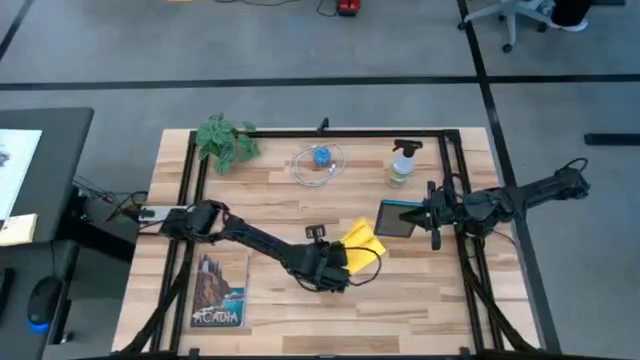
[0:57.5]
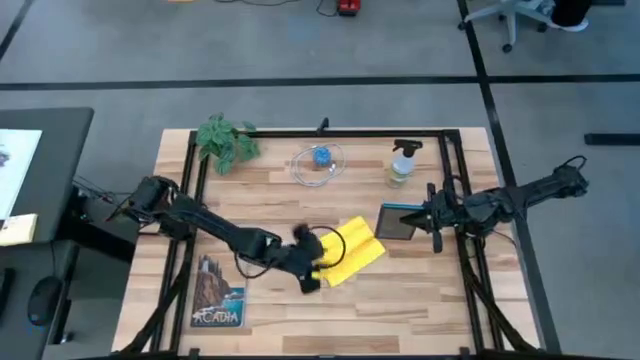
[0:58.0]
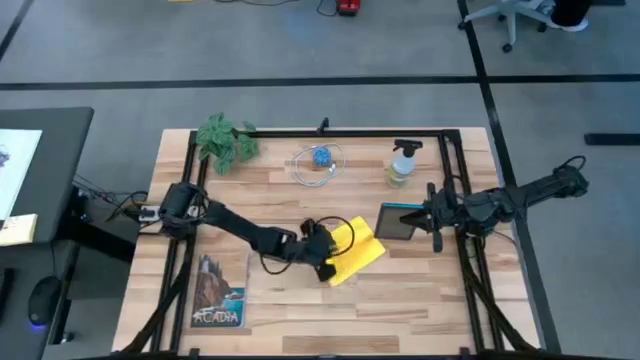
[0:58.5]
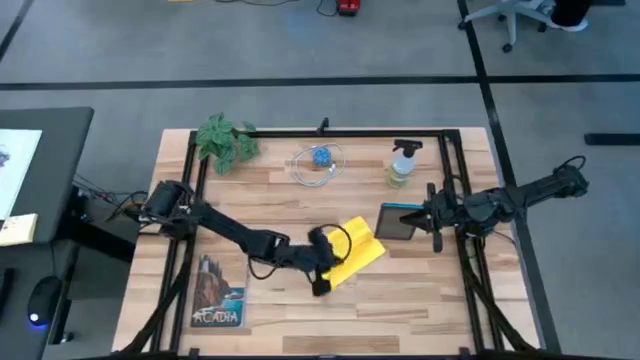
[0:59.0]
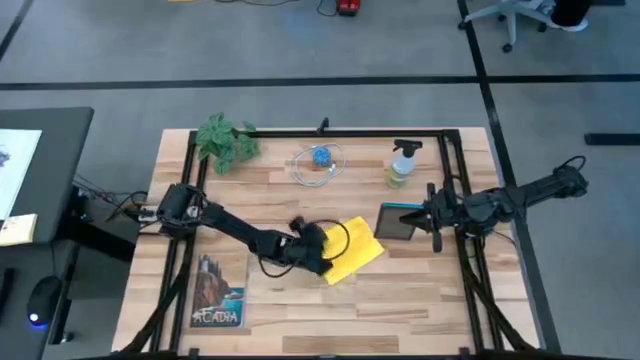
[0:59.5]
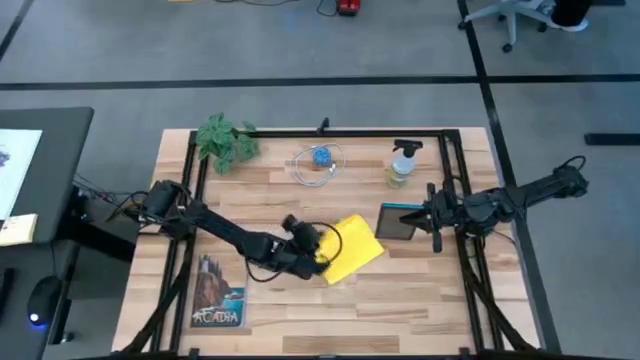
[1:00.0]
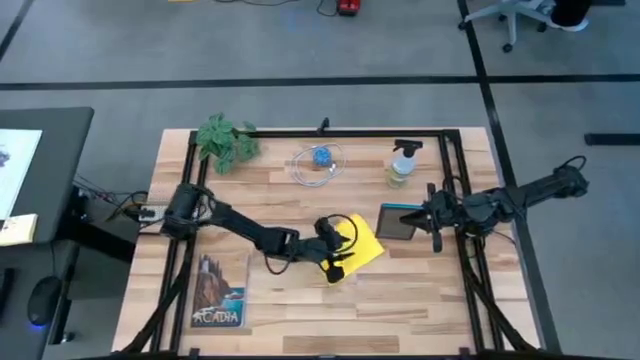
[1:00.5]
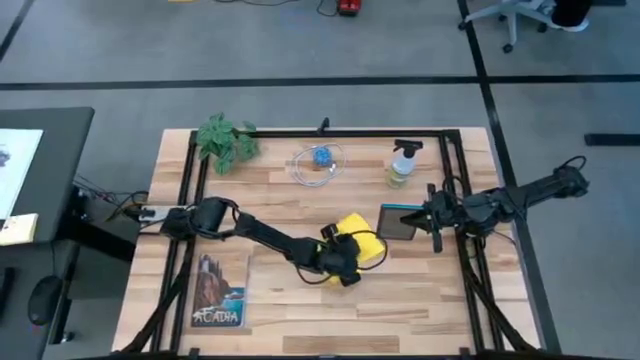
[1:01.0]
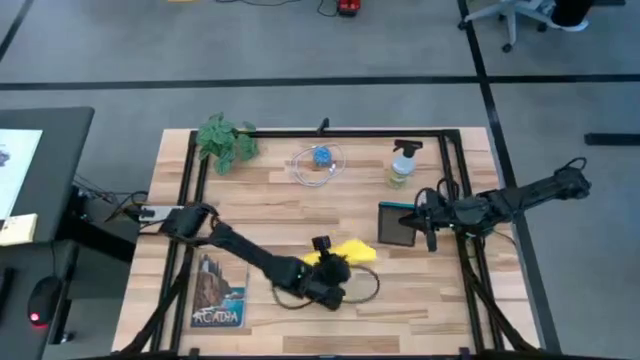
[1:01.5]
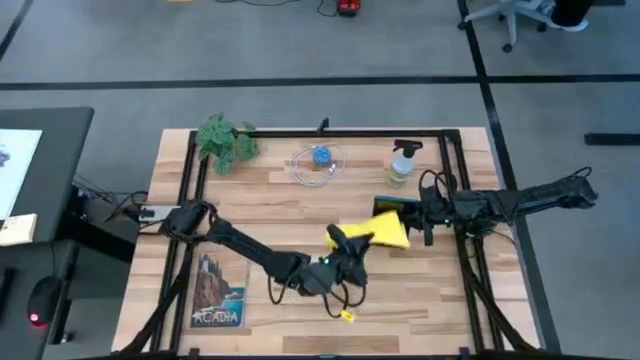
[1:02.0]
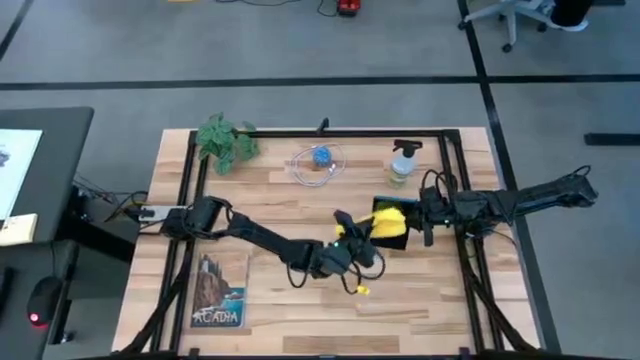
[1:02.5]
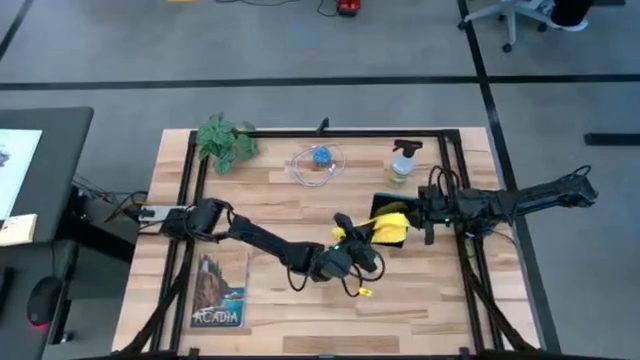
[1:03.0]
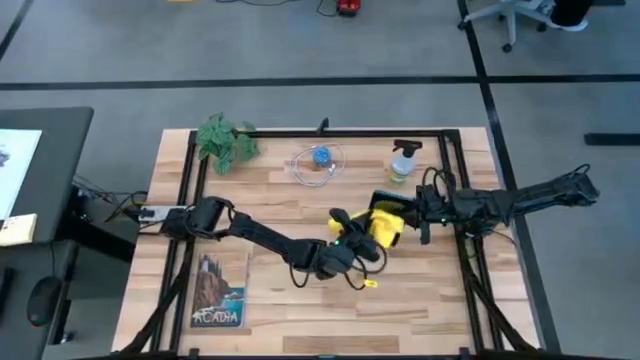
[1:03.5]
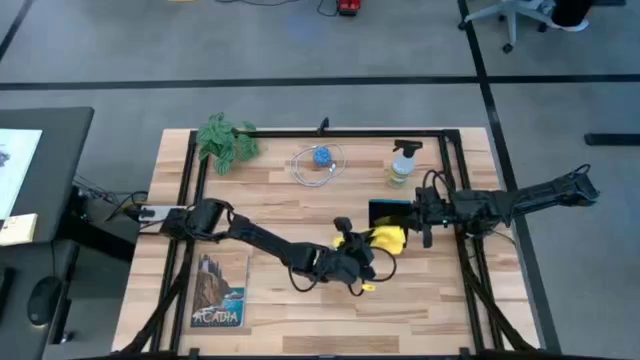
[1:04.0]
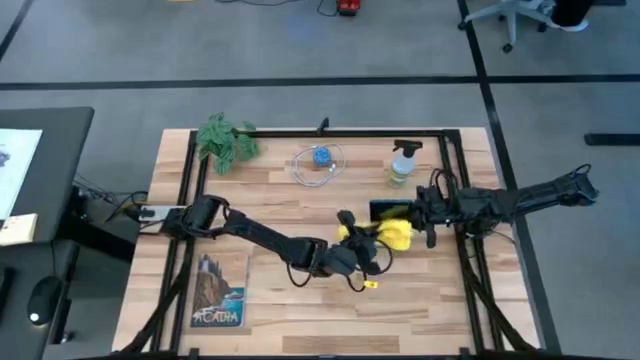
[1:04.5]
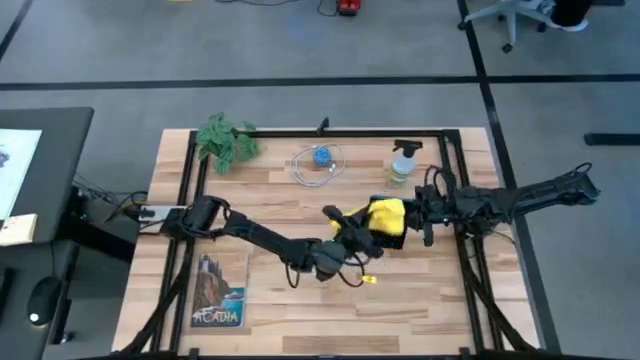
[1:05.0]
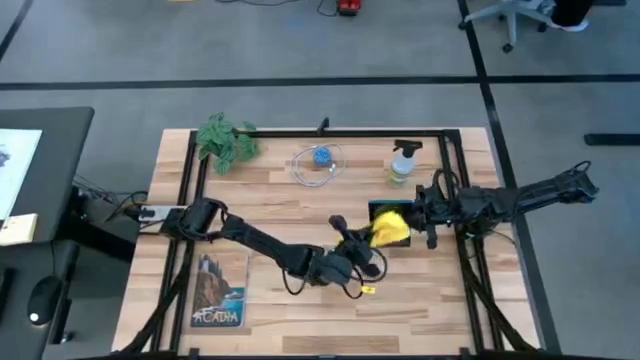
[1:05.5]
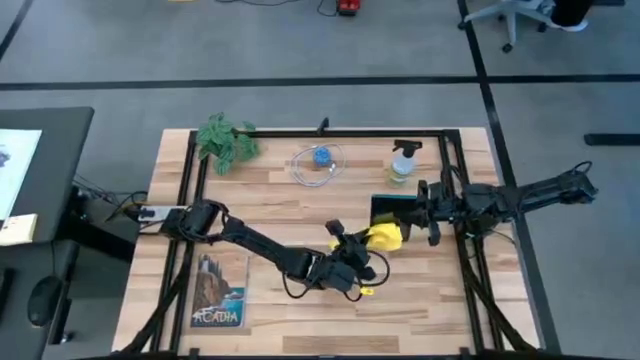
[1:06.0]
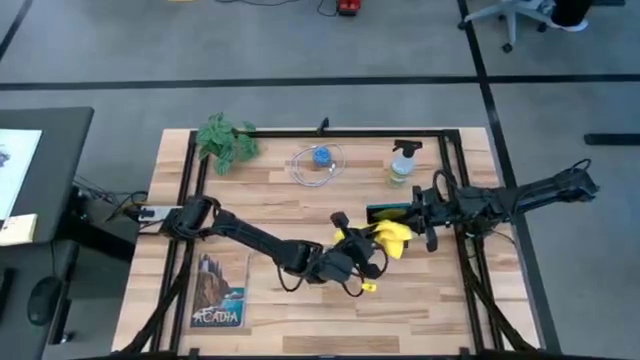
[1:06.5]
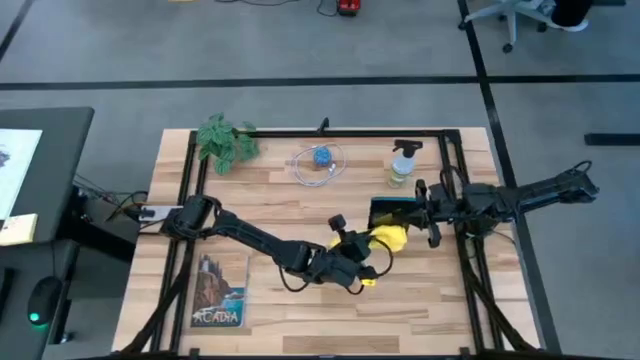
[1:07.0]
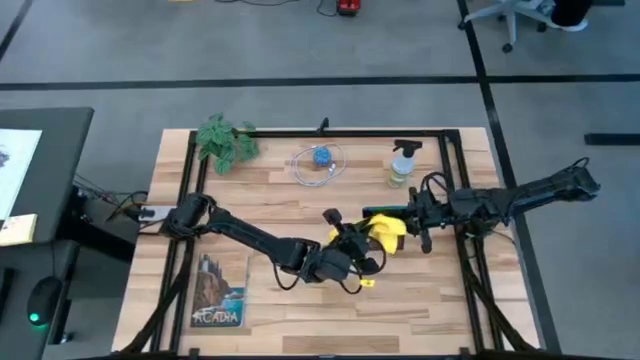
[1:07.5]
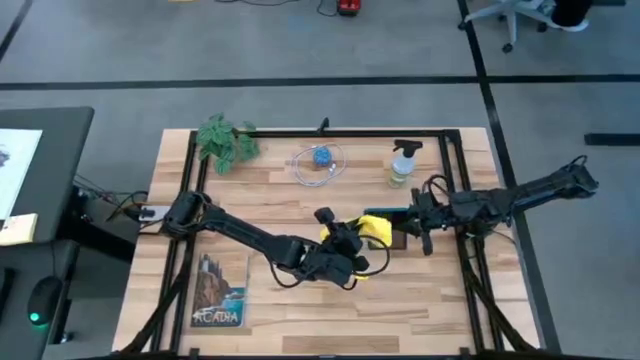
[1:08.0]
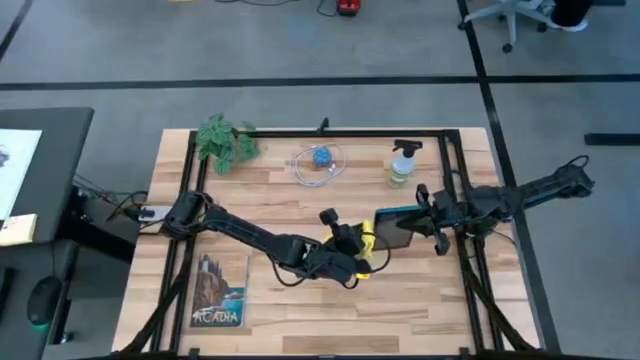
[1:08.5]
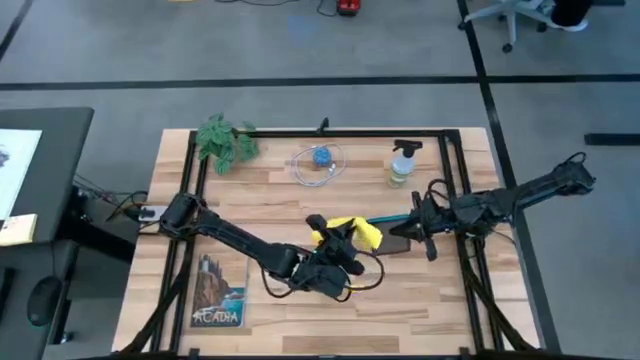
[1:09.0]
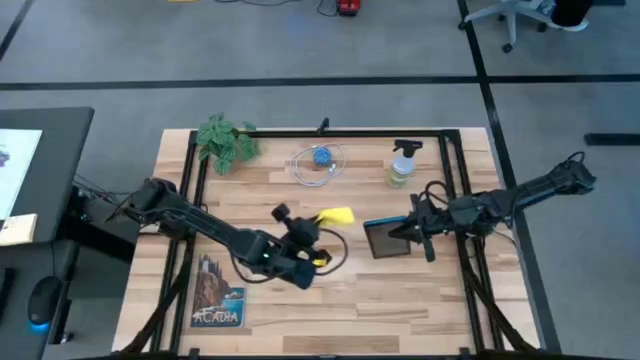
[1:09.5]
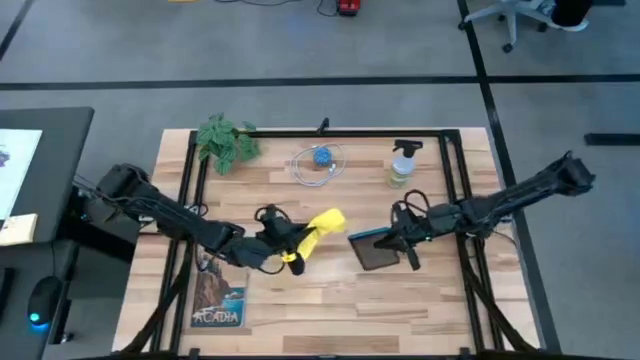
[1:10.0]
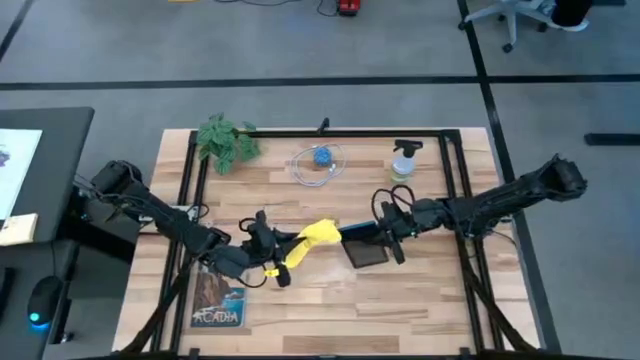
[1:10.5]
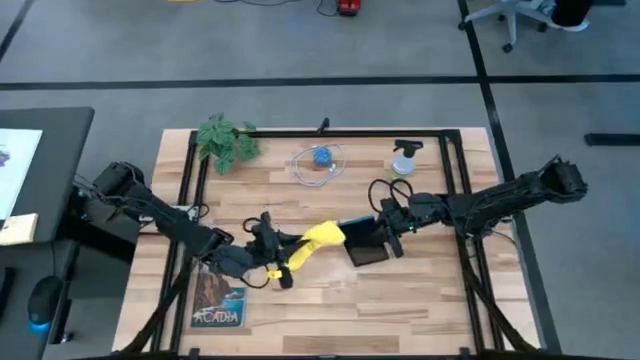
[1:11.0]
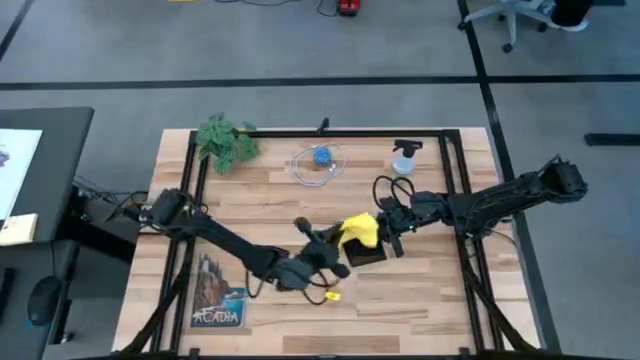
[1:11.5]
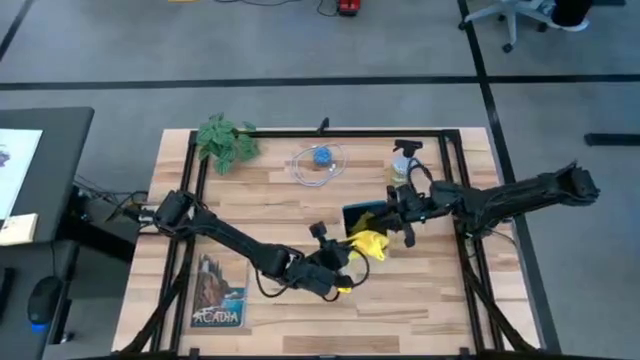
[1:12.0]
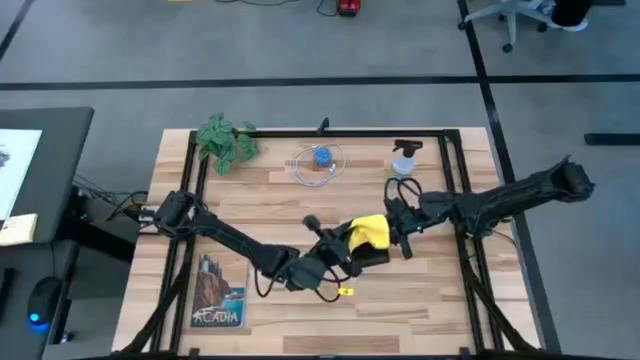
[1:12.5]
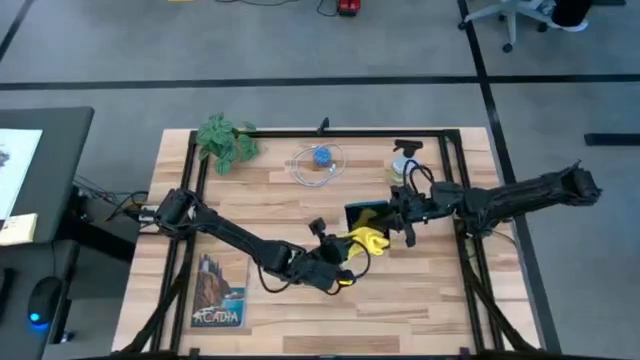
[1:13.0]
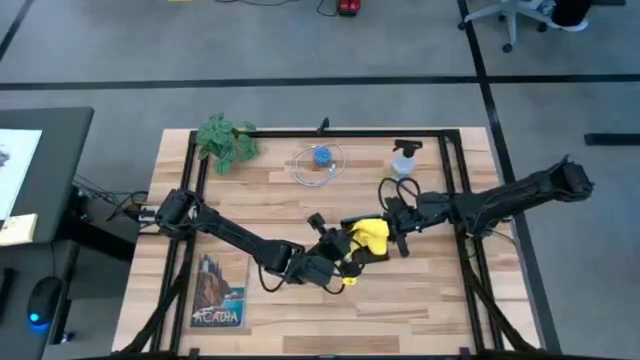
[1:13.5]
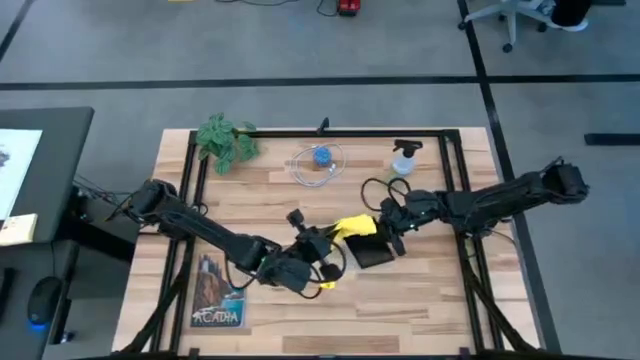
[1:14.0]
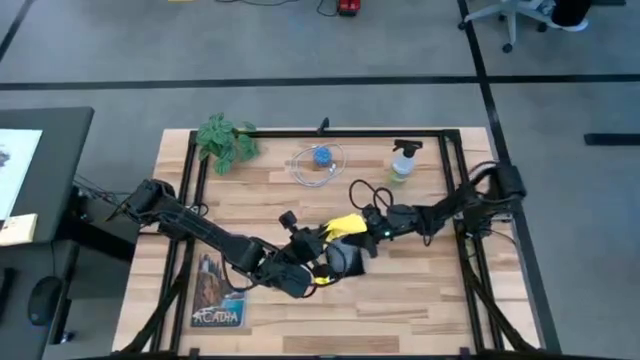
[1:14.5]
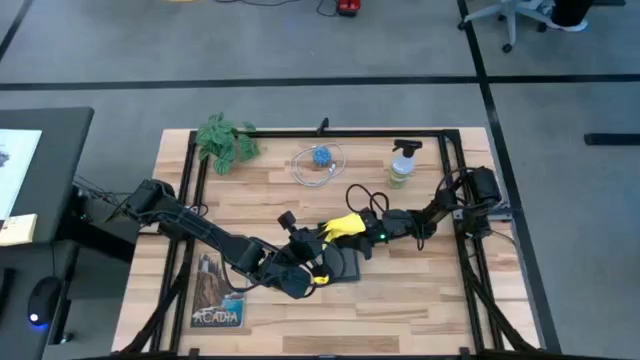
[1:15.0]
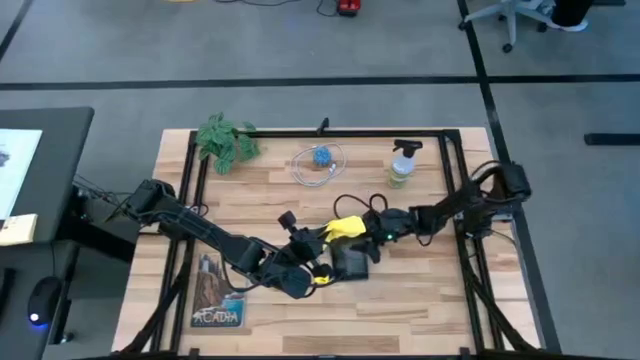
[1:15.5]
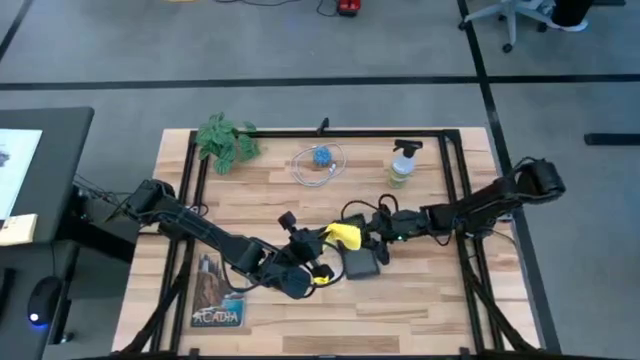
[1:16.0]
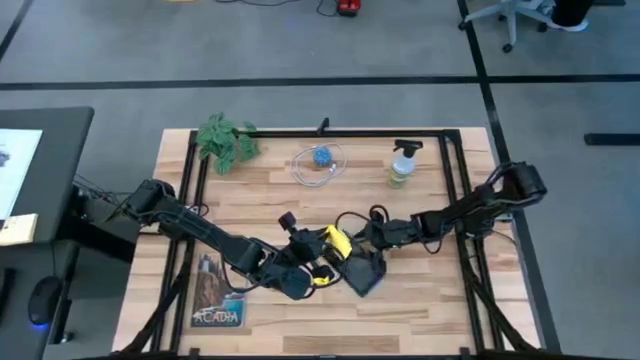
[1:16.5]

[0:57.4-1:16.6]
Task: Apply microfiber cloth
Wipe the tablet with the yellow microfiber cloth

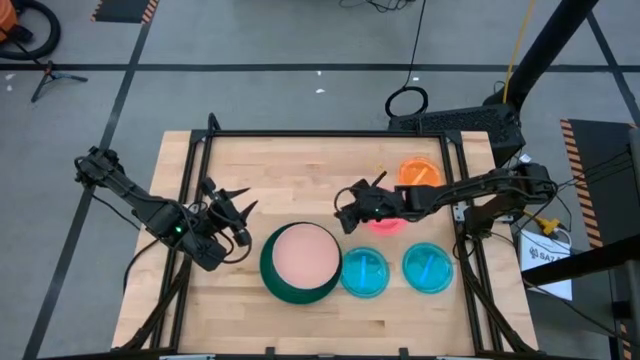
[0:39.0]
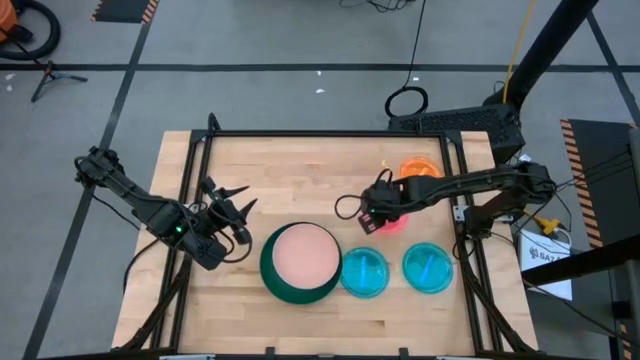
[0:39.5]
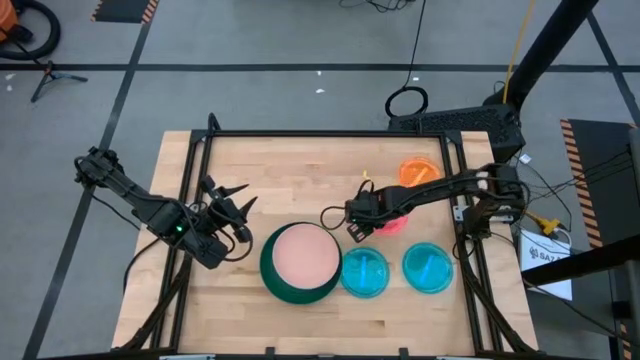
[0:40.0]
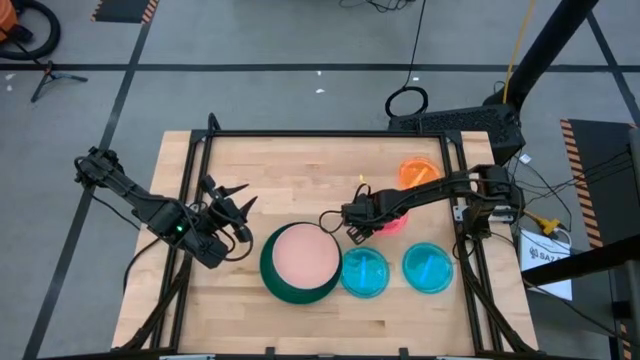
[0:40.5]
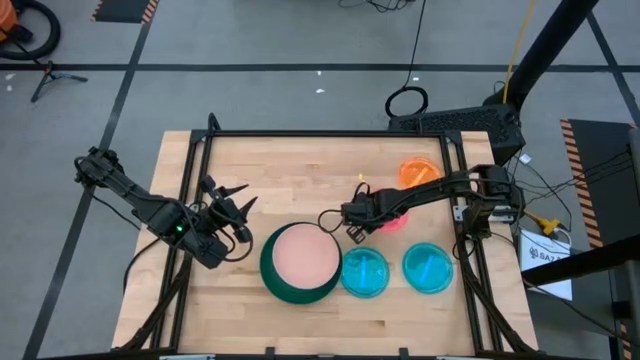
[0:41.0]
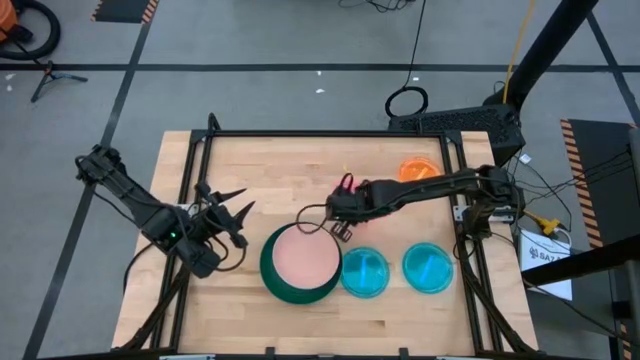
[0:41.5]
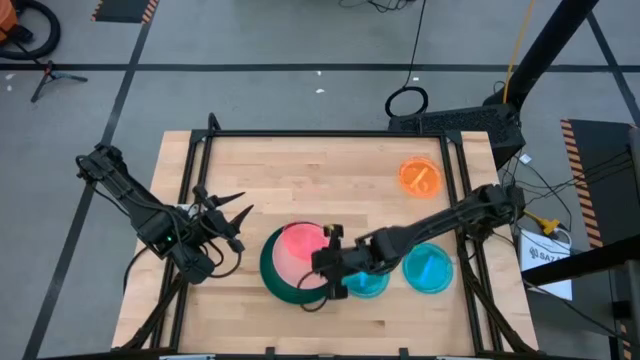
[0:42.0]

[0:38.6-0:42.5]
Task: Stack plastic plates
Stack the pink plate on the light pink plate
